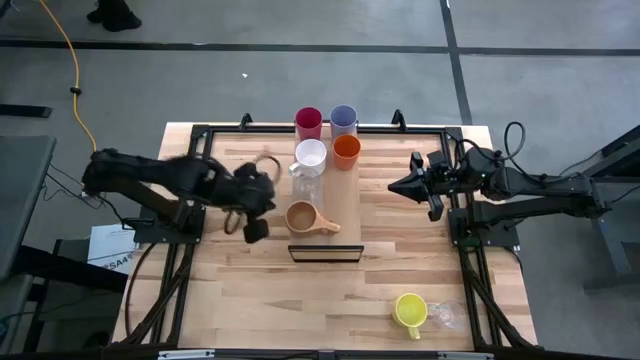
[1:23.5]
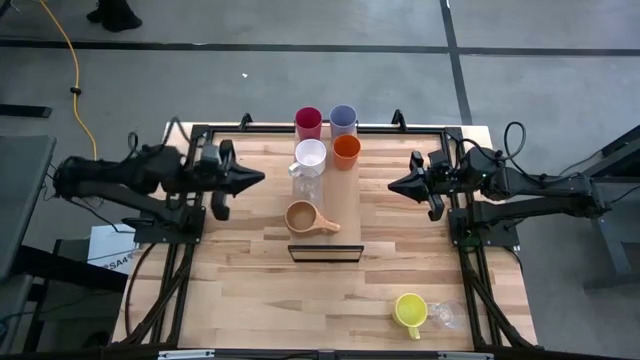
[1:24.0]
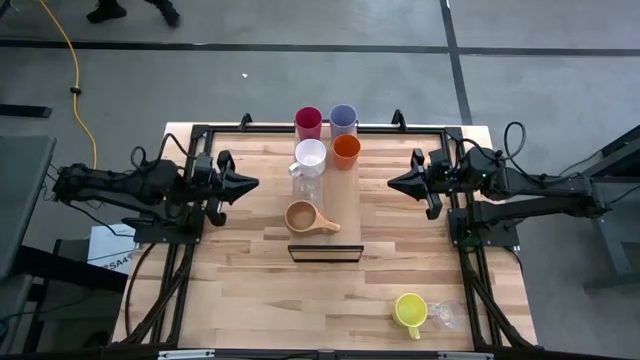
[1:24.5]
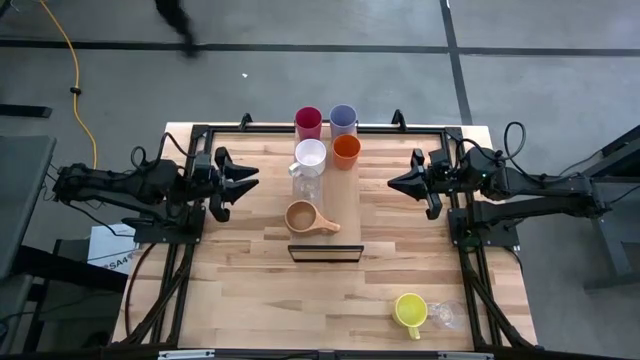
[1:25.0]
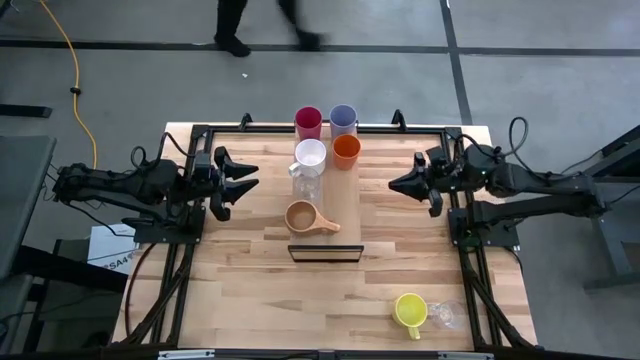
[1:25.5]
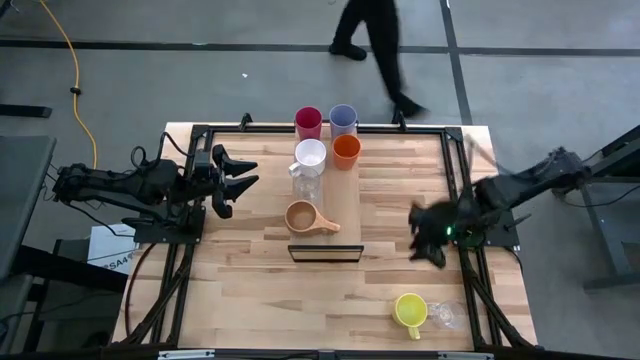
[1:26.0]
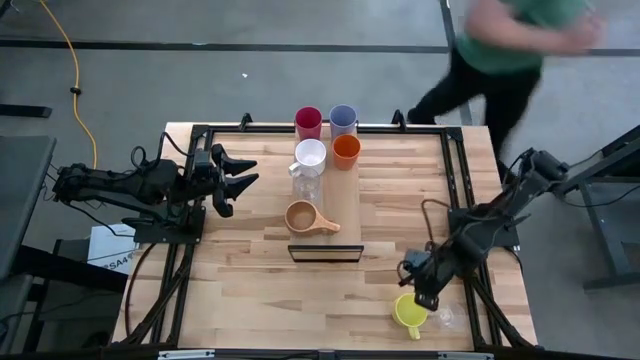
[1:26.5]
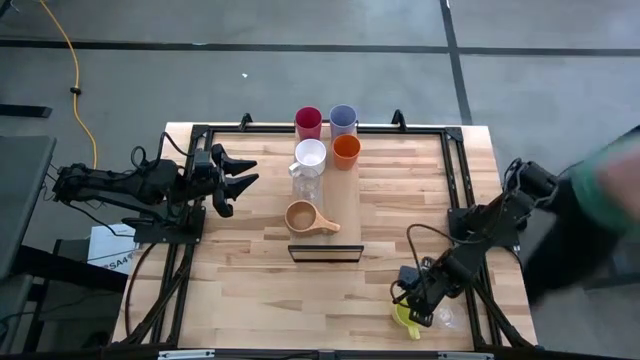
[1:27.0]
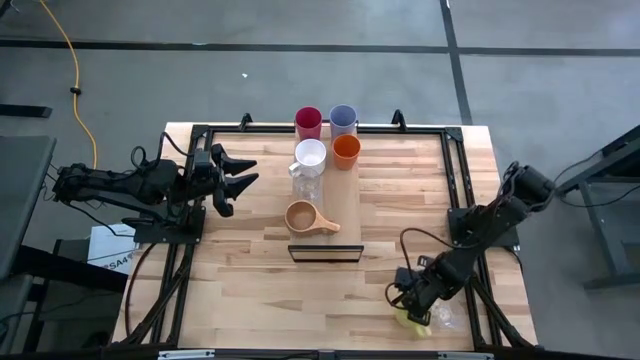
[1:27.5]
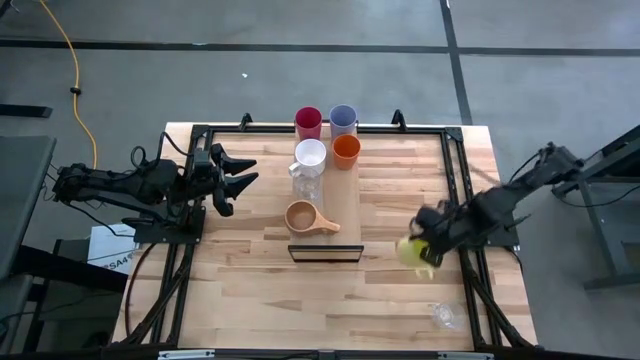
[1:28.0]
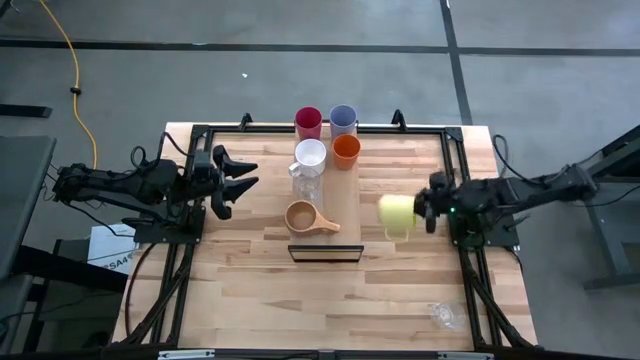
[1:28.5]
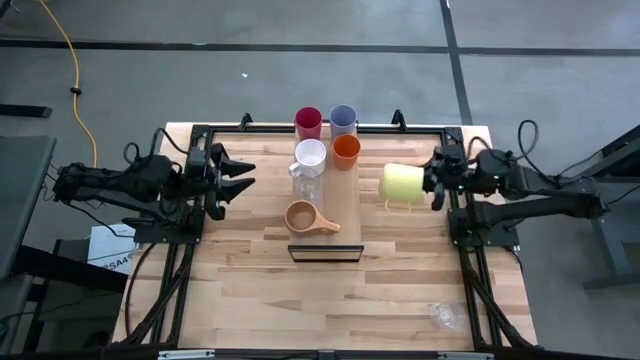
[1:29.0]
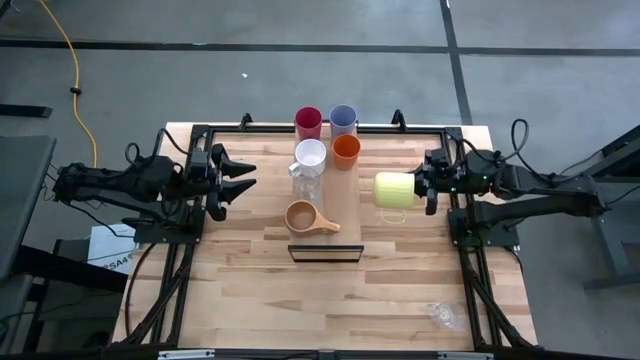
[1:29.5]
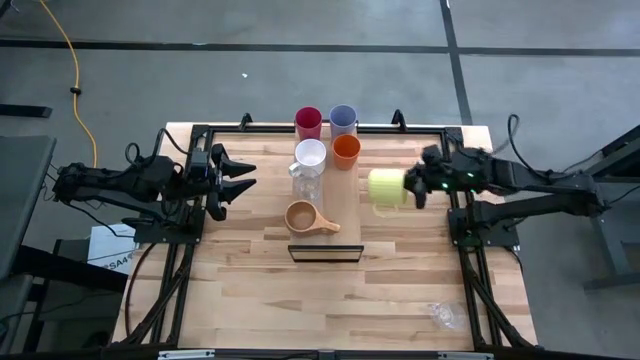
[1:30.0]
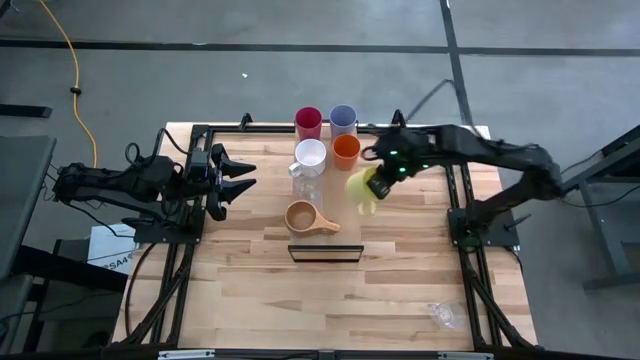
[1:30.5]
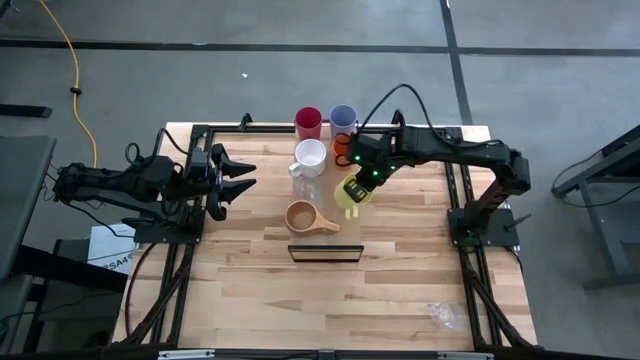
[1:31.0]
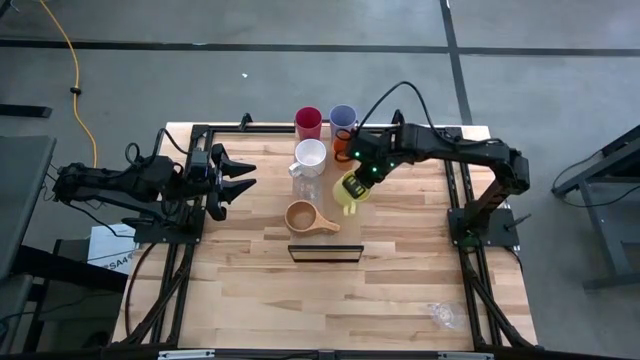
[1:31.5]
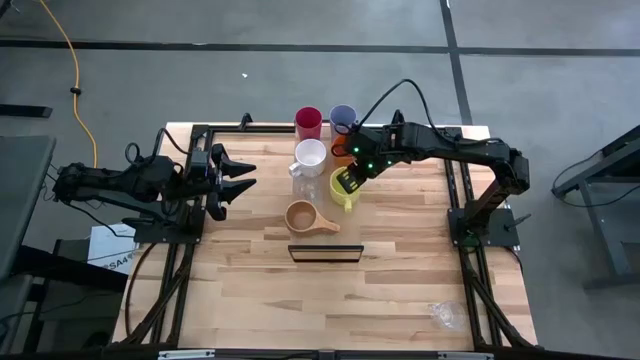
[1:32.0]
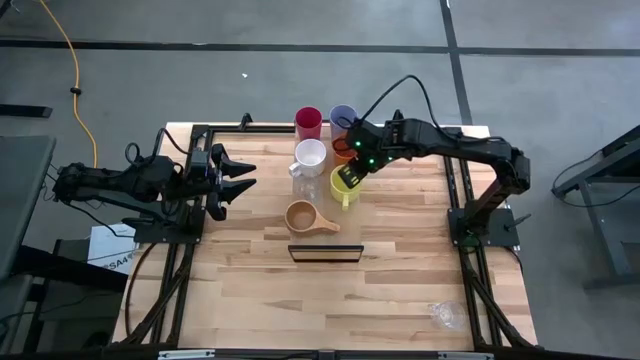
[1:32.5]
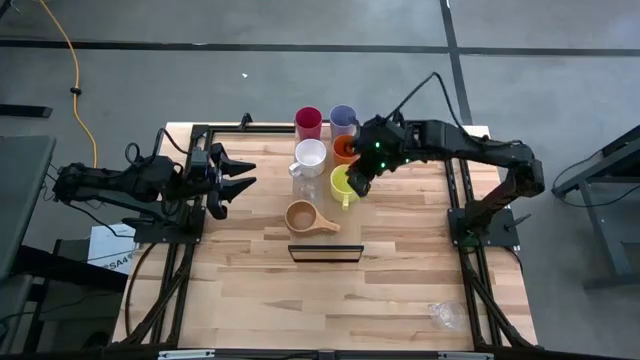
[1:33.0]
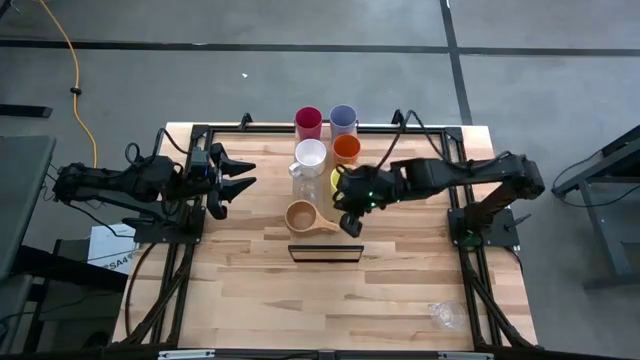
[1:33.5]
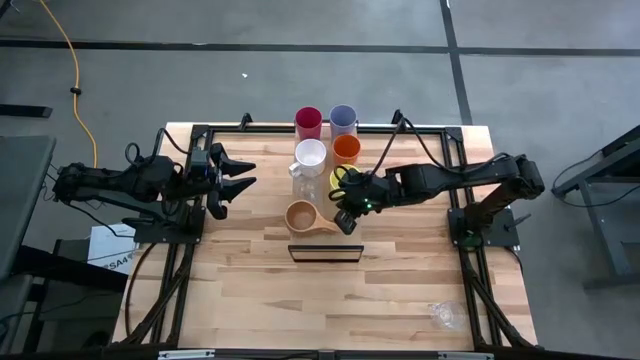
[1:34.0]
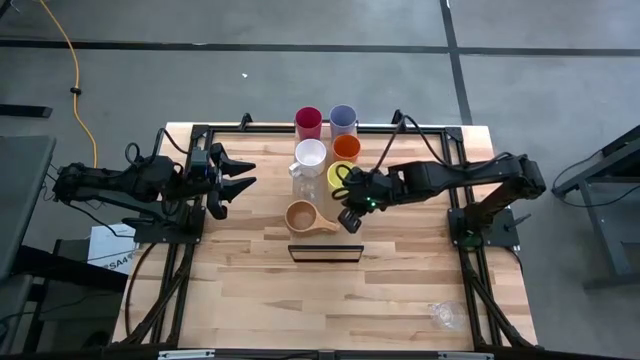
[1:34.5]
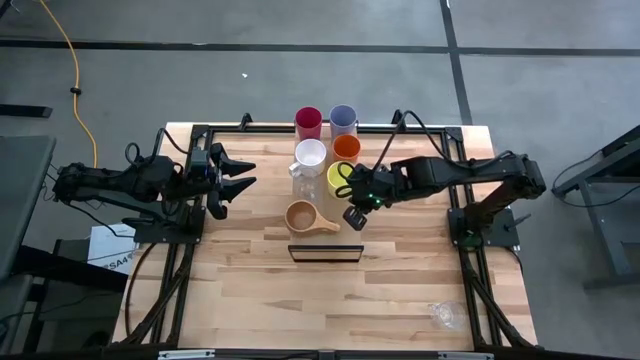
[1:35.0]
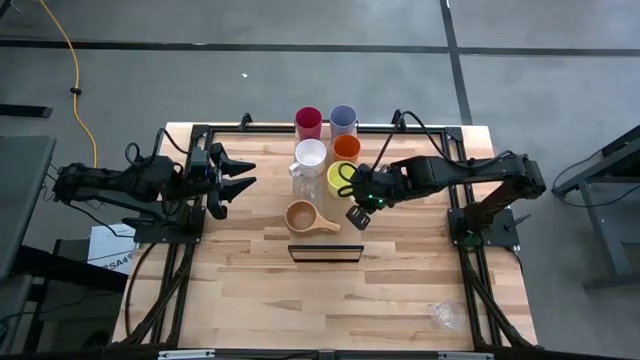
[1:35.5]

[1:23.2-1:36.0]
Task: Stack small to large cups/mugs on shelf
Put the yellow mug on the shelf

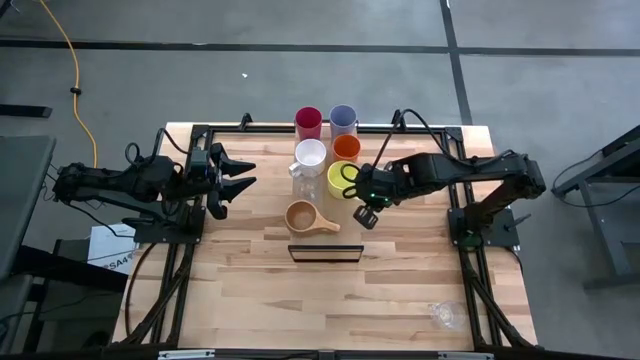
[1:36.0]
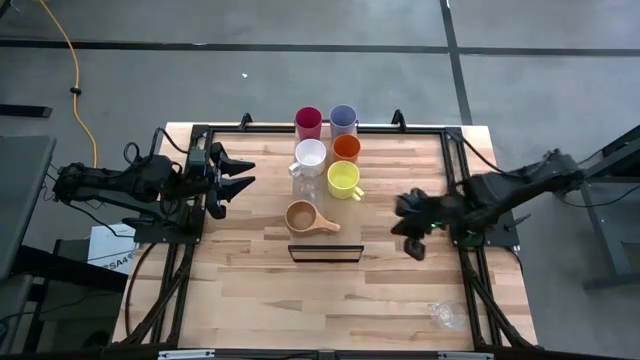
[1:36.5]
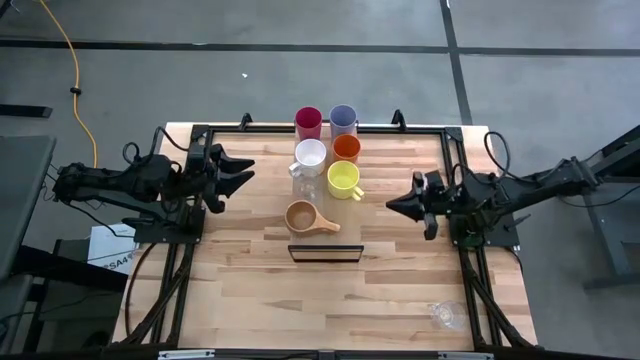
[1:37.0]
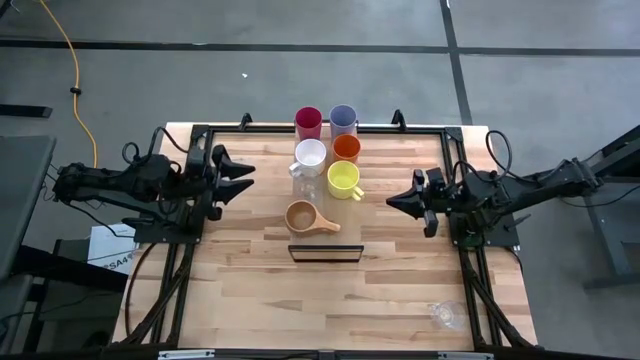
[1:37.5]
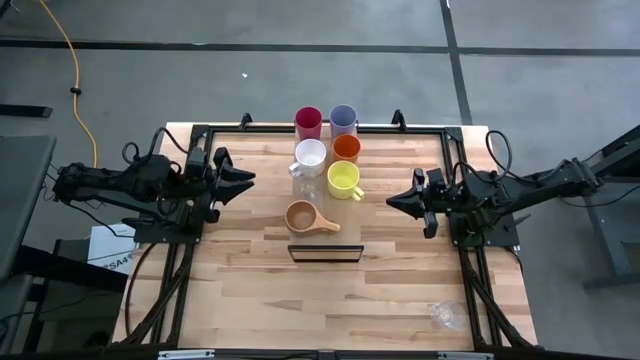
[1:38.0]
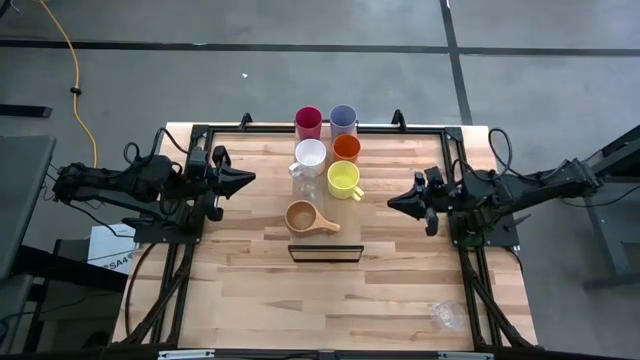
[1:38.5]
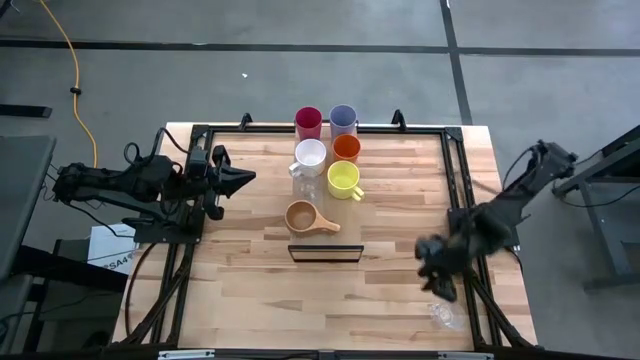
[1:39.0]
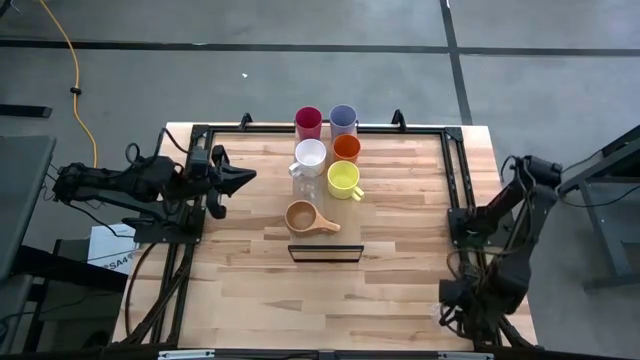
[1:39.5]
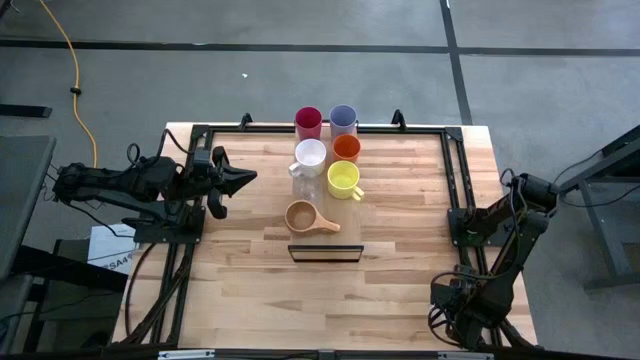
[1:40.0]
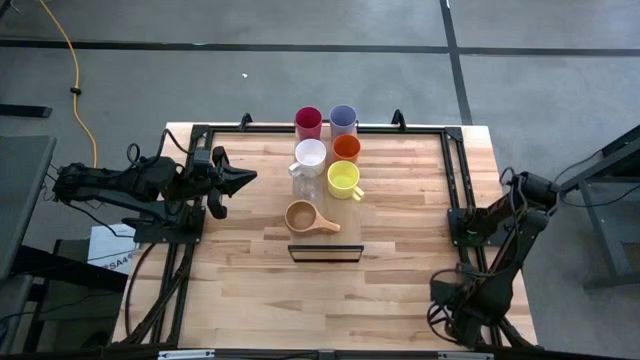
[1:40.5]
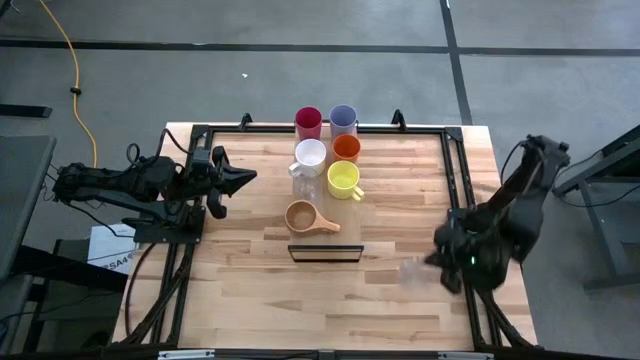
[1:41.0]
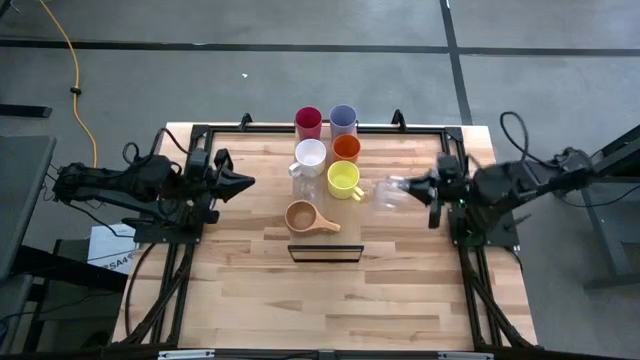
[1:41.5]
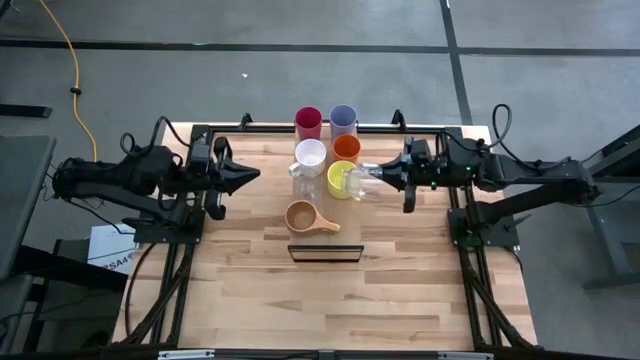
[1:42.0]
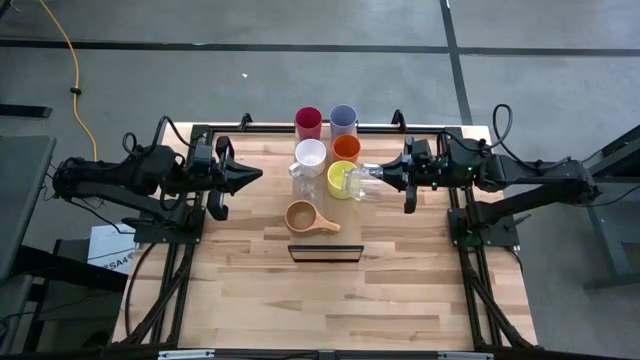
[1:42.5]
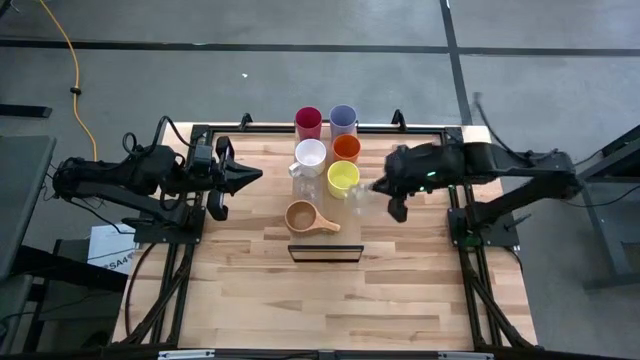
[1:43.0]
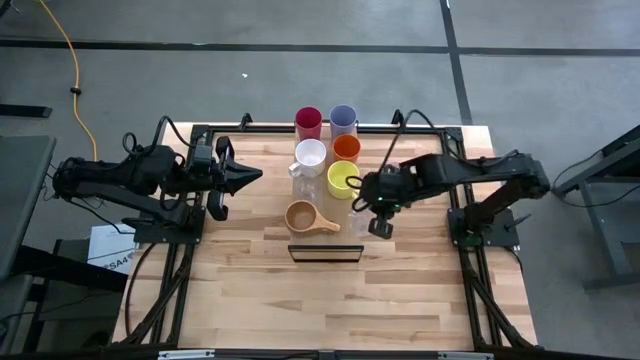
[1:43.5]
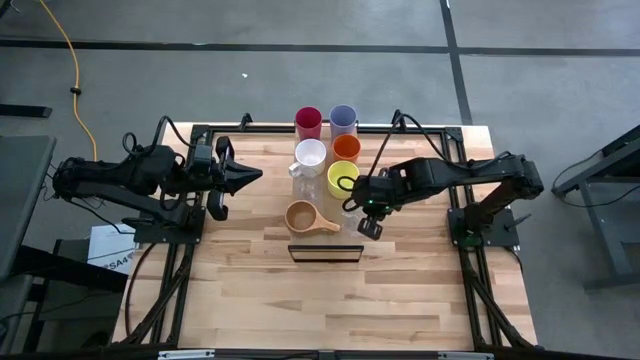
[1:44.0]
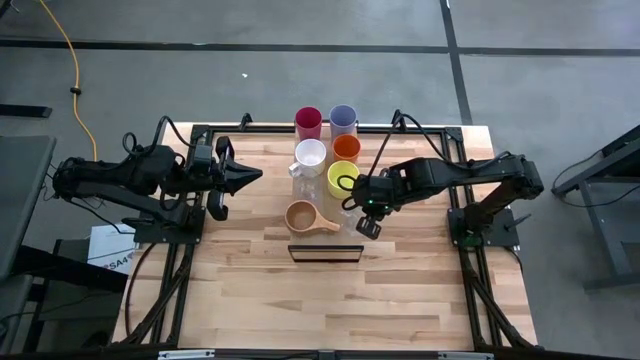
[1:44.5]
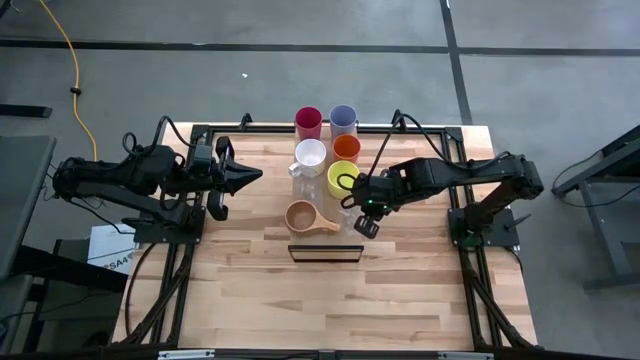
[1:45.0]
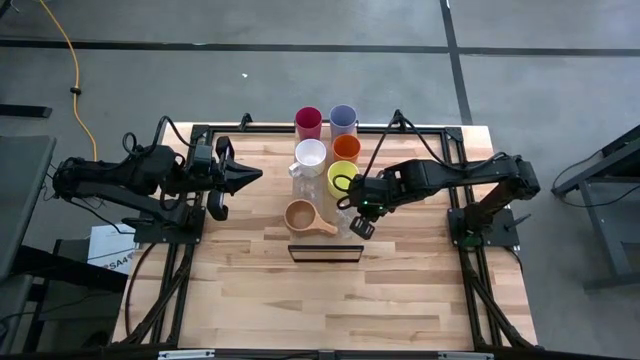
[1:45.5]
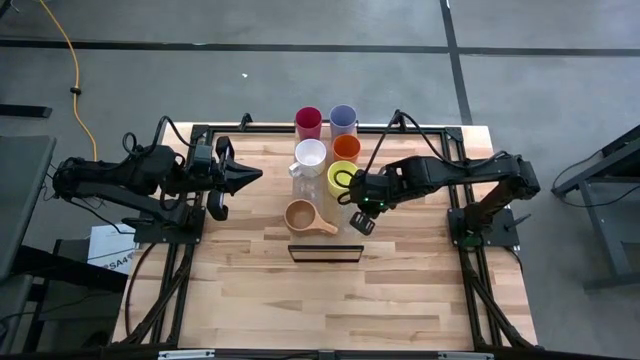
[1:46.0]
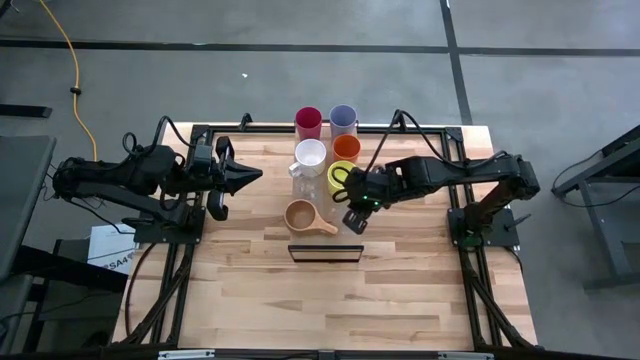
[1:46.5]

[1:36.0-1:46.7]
Put the transparent mug on the shelf
